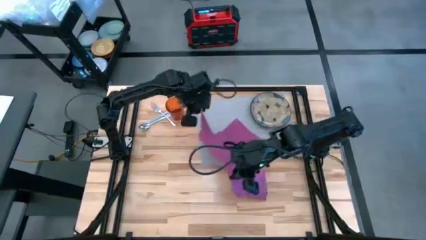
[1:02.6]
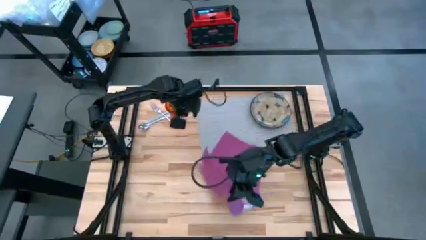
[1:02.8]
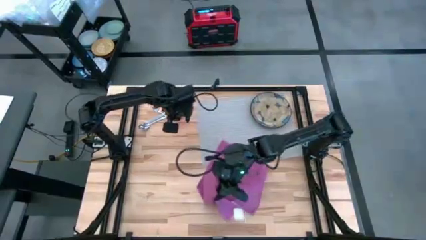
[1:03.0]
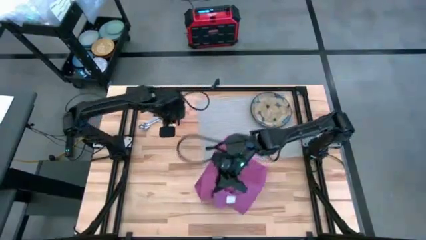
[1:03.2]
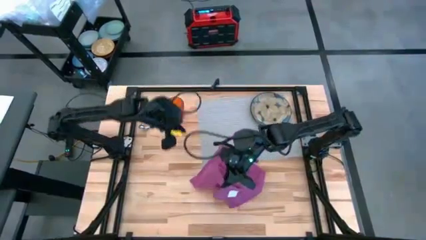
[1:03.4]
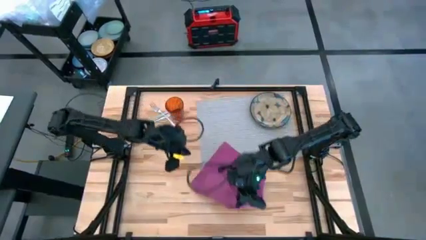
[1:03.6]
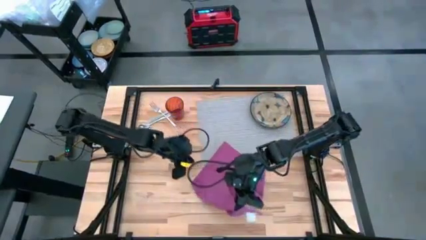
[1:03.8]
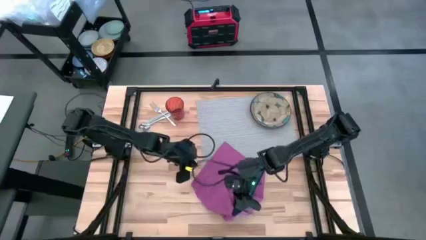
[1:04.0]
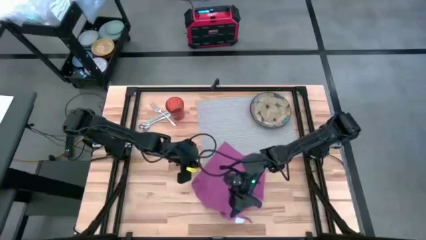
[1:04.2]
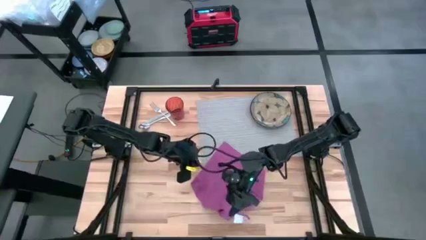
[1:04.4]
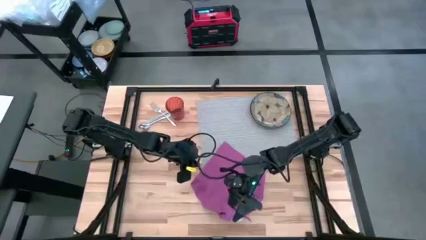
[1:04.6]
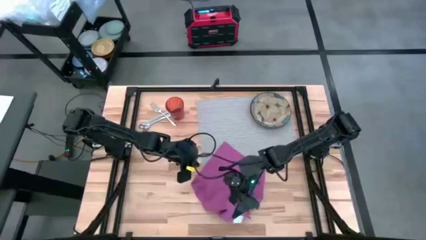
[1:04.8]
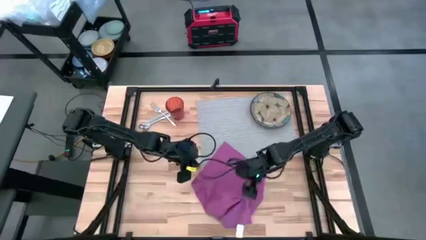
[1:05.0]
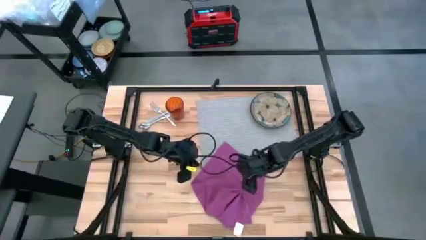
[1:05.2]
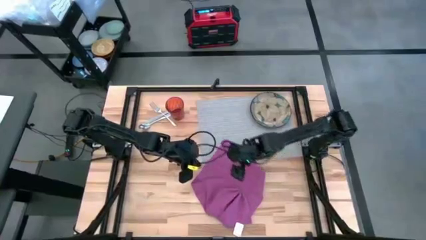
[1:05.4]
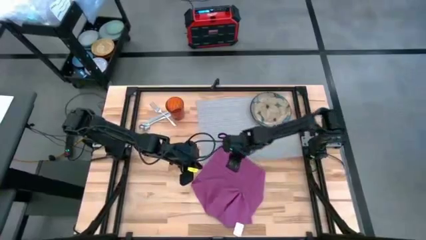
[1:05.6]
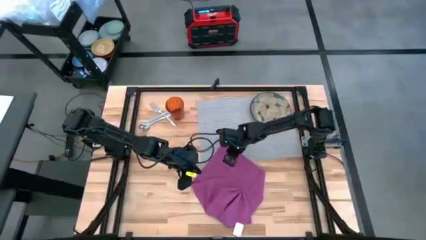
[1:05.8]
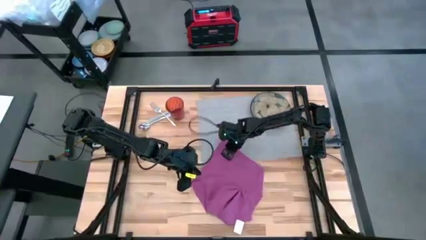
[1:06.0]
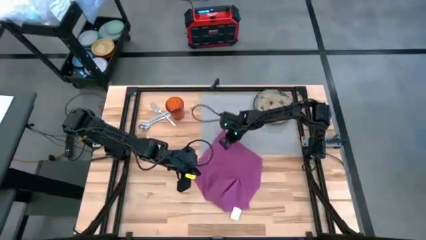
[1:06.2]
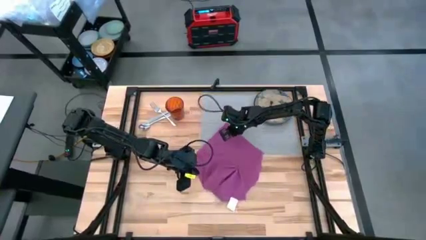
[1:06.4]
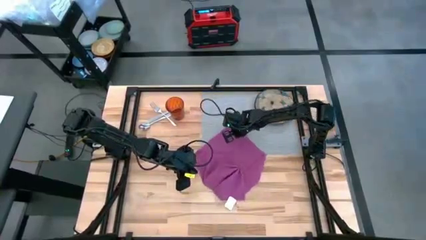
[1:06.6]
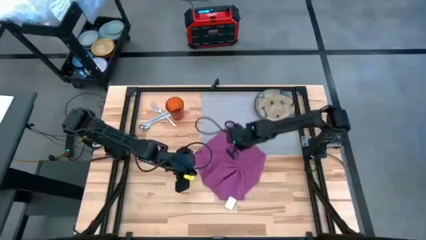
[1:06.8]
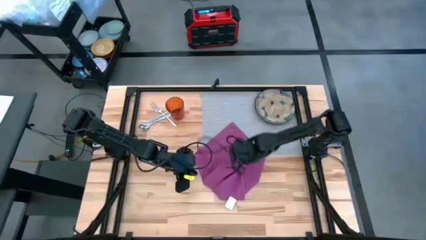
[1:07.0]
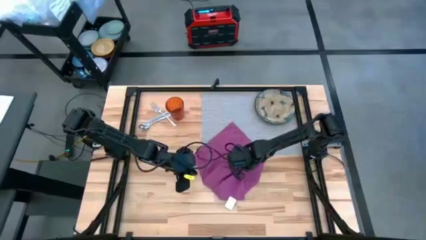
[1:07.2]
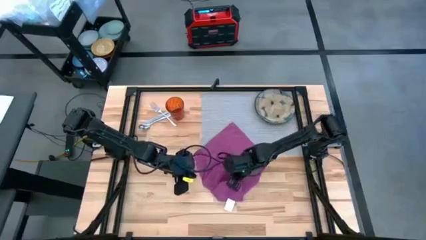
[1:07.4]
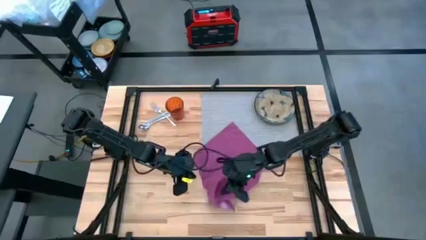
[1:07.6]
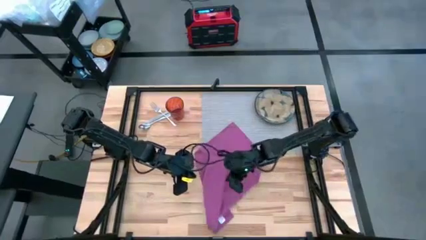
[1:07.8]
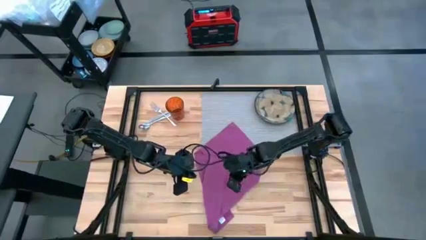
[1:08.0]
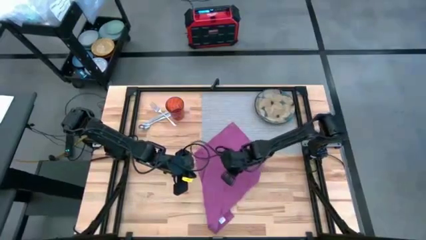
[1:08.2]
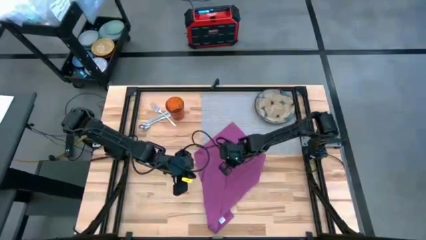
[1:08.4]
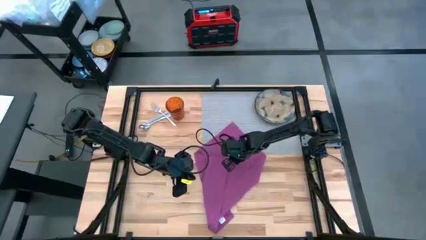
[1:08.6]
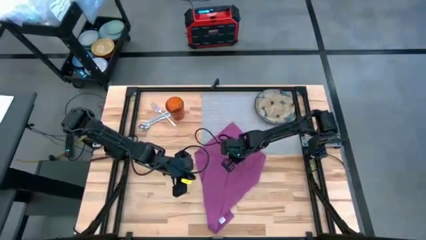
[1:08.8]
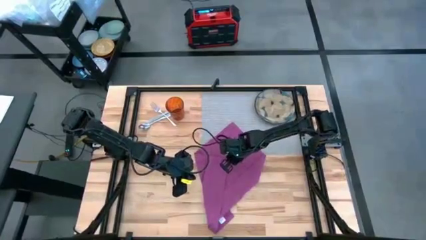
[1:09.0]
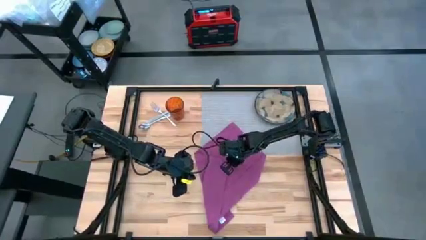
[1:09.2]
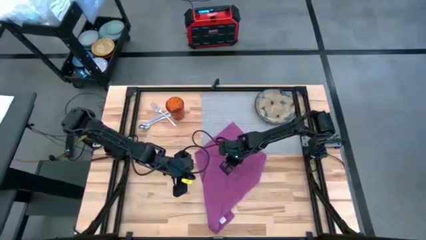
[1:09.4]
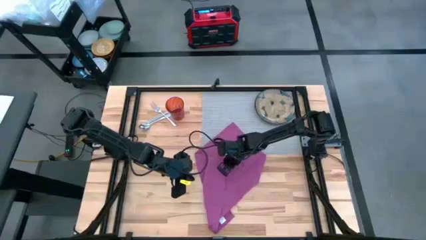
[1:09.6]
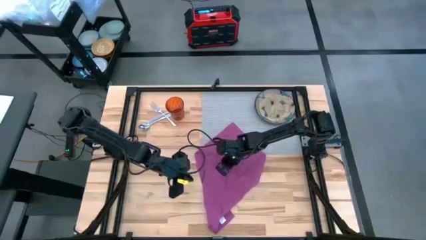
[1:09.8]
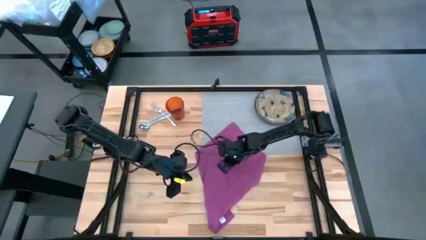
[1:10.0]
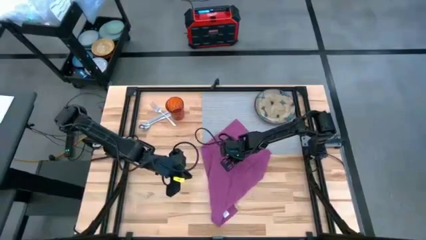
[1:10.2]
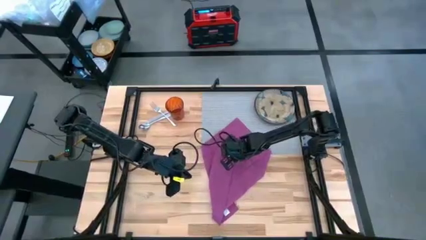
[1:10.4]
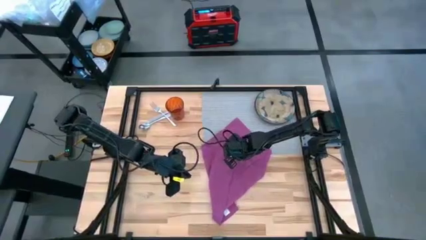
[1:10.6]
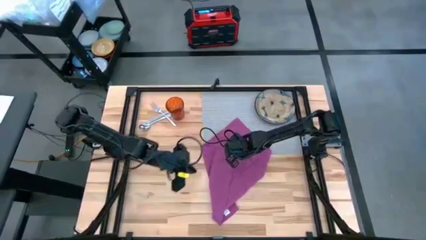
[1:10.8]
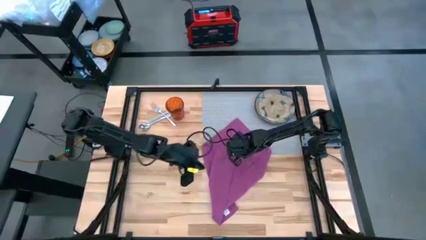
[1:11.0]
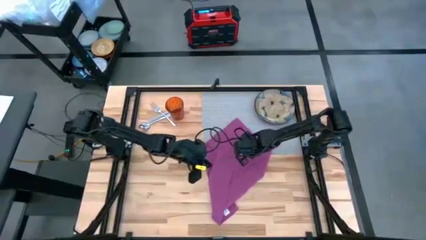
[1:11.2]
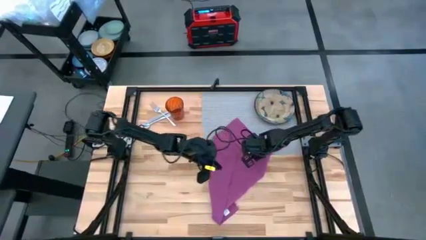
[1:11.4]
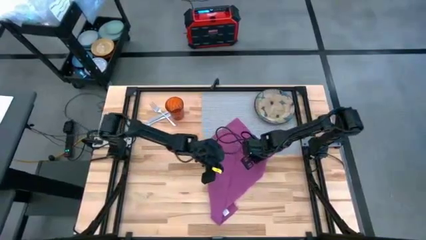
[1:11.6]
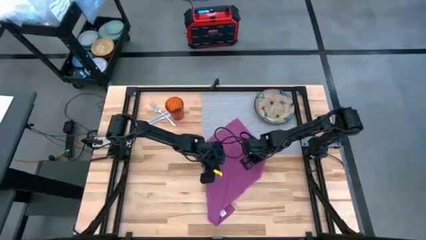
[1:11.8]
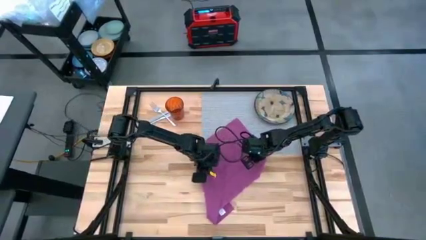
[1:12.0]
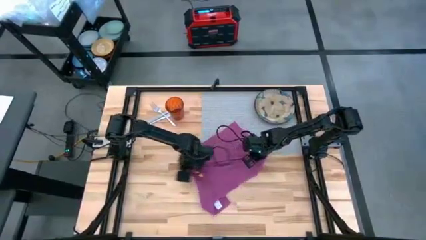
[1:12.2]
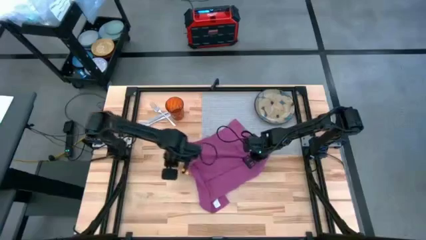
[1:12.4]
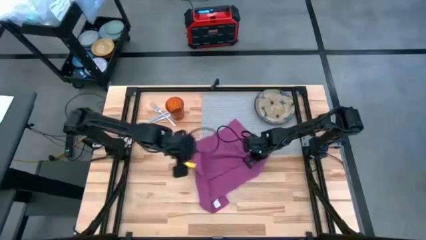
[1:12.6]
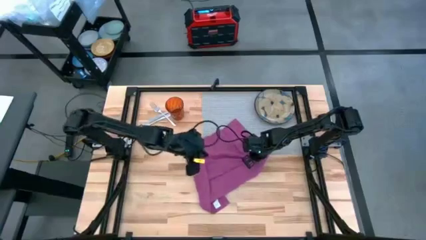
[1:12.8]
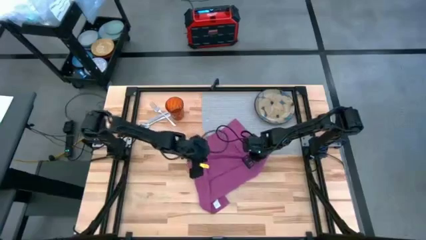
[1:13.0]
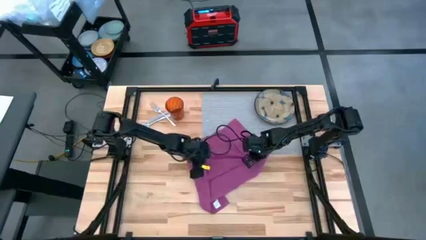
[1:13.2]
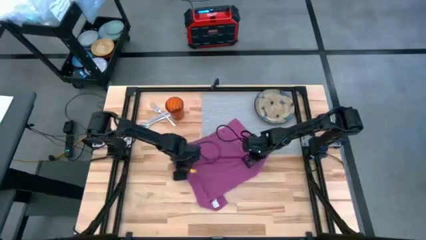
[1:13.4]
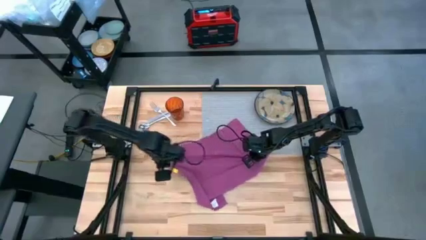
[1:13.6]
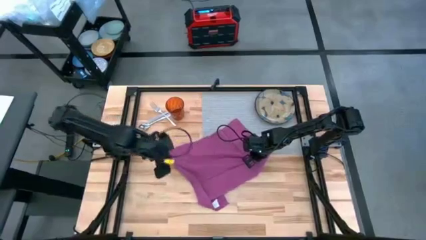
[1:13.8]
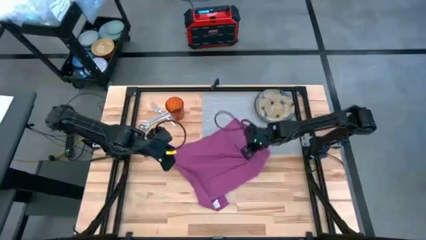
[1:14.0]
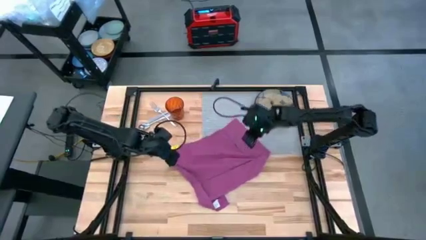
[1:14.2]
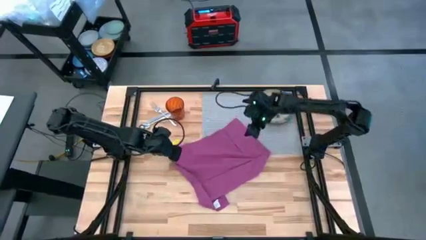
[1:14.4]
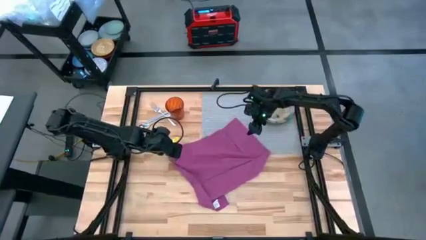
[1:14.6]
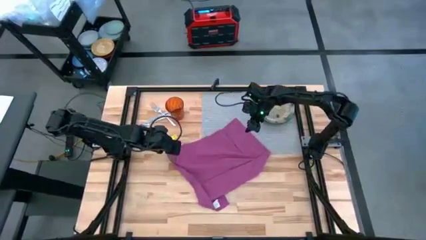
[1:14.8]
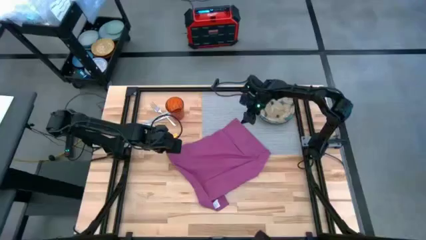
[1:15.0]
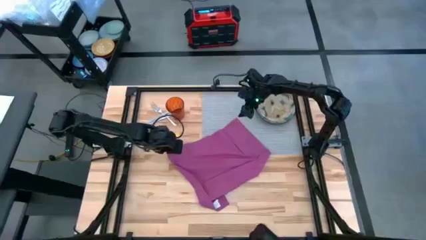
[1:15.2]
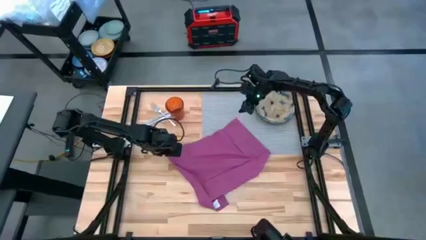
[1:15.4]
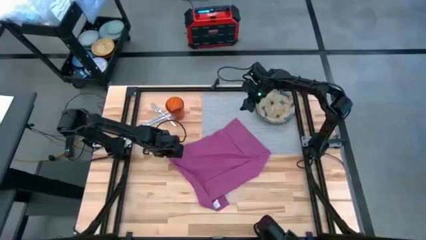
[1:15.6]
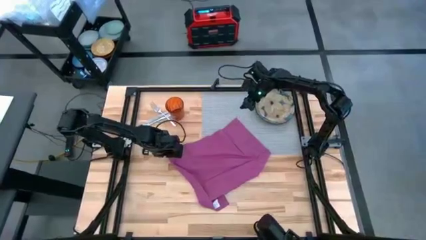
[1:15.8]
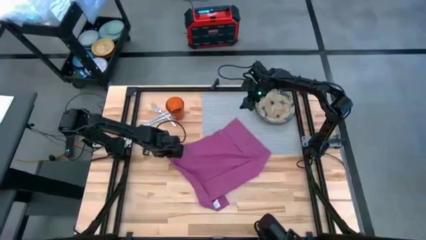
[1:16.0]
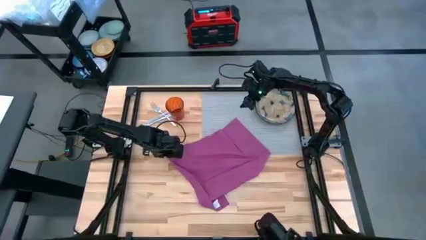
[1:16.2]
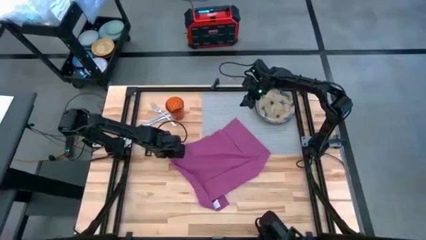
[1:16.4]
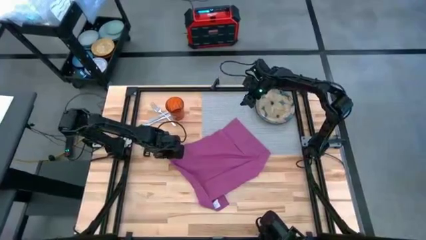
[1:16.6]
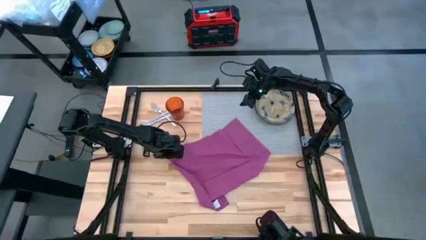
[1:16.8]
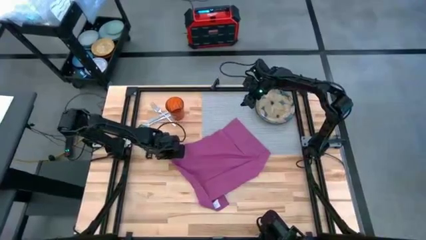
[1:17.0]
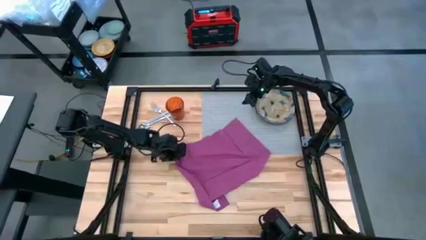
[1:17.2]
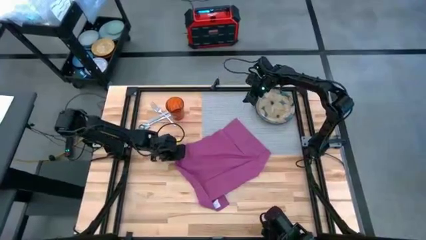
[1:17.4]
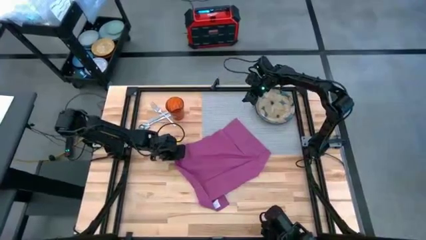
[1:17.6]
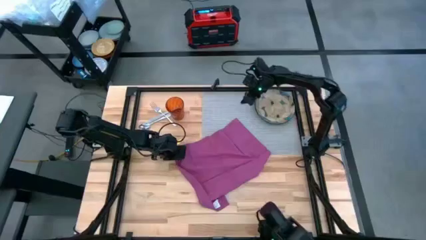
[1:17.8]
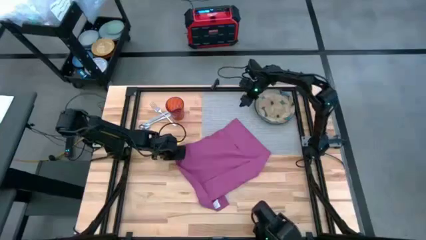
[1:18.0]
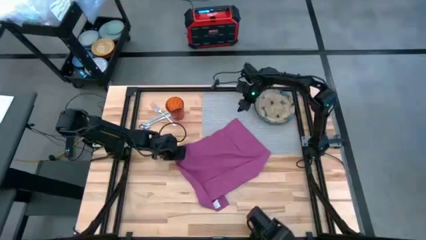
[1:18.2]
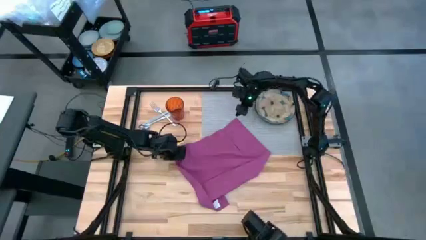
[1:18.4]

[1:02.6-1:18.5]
Task: Set table place
Fold the purple napkin
